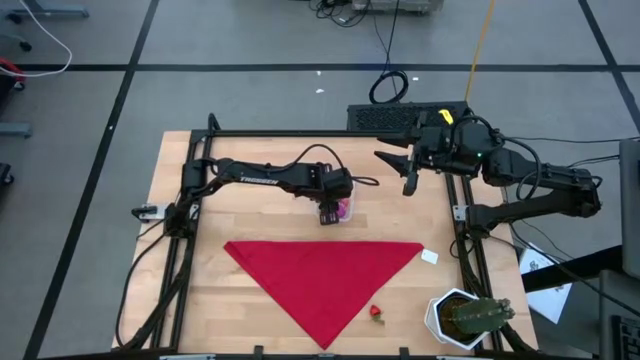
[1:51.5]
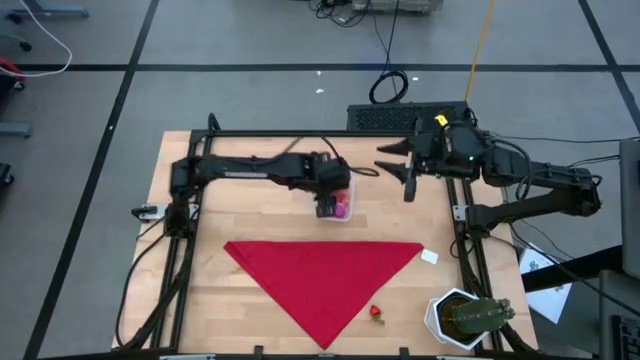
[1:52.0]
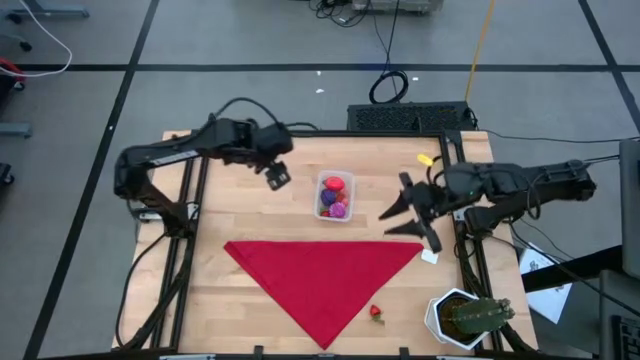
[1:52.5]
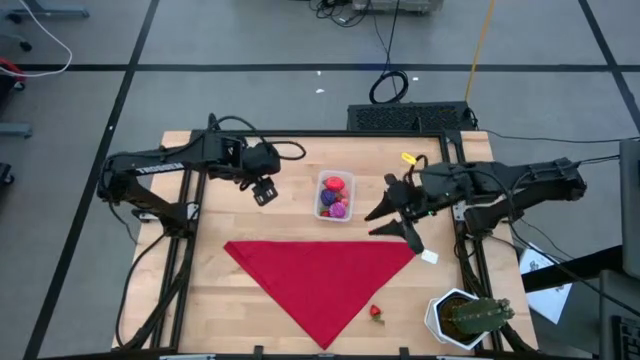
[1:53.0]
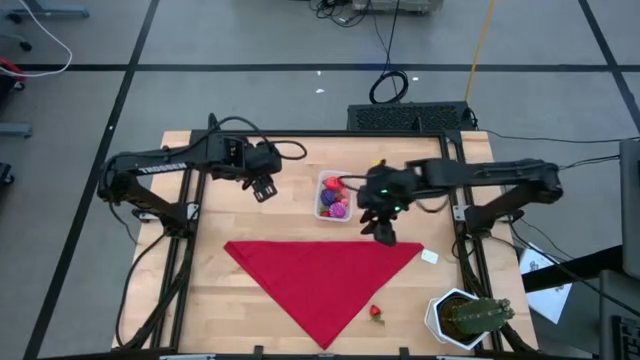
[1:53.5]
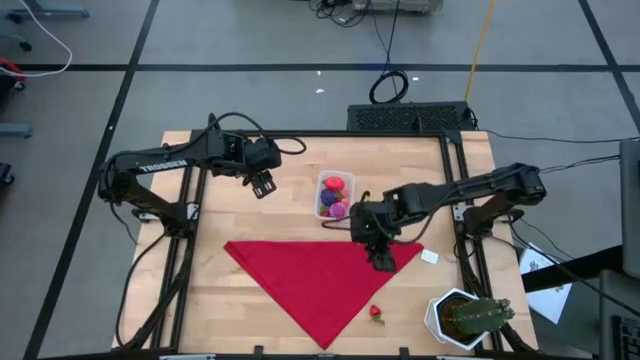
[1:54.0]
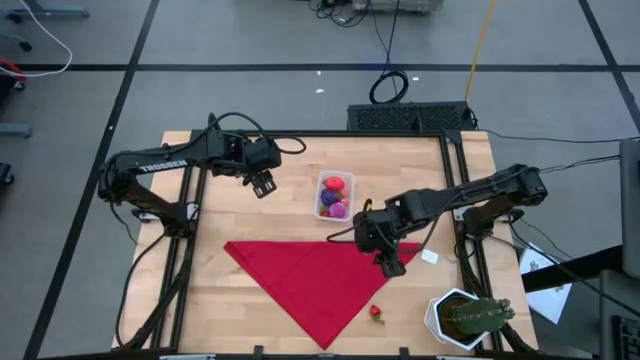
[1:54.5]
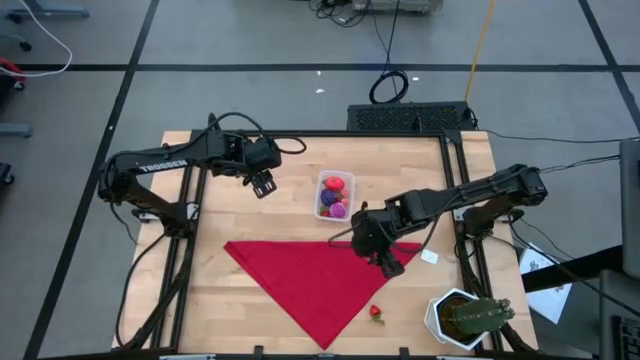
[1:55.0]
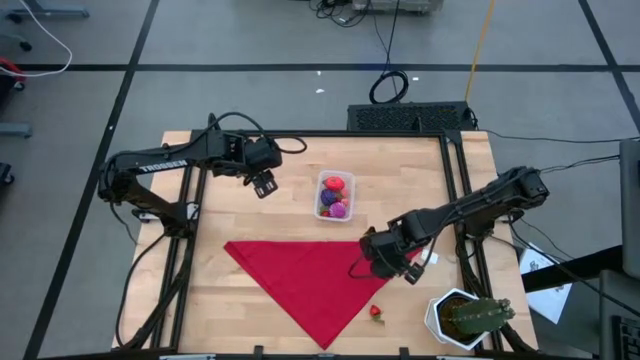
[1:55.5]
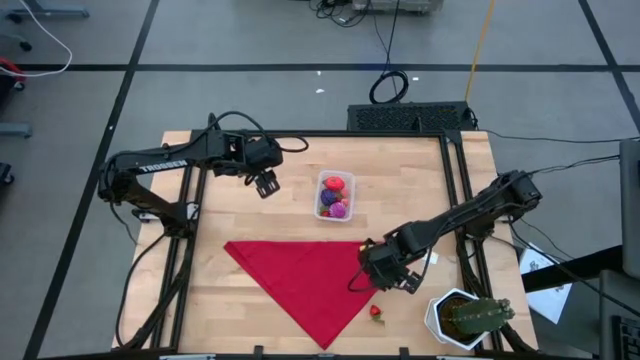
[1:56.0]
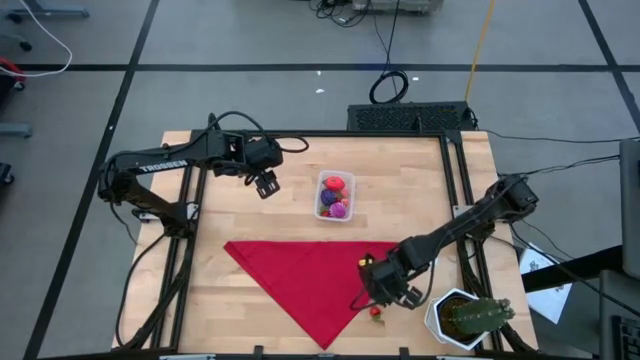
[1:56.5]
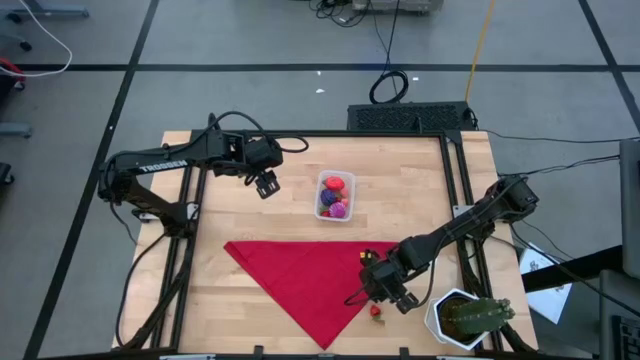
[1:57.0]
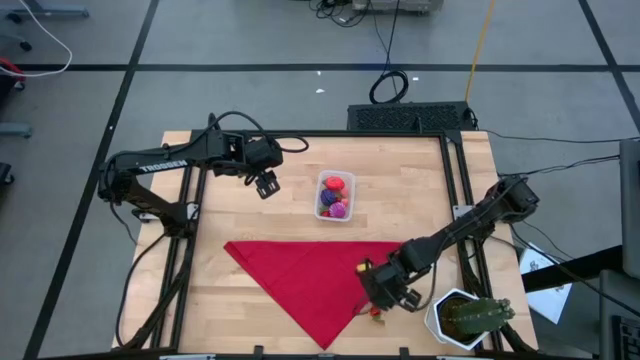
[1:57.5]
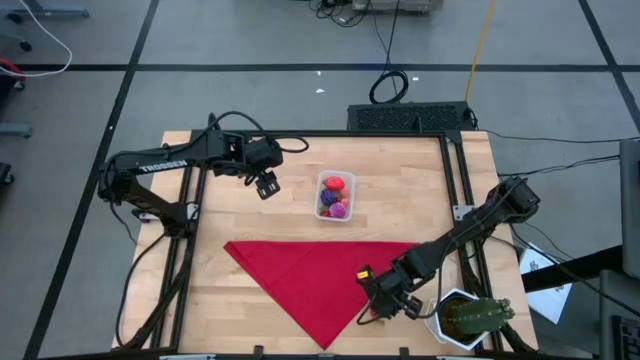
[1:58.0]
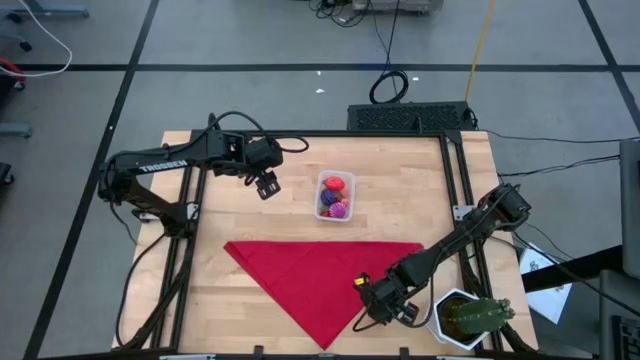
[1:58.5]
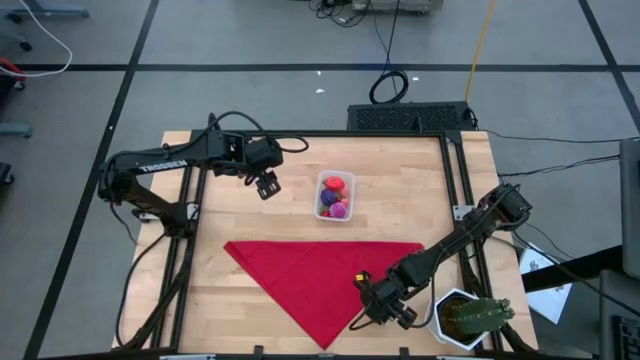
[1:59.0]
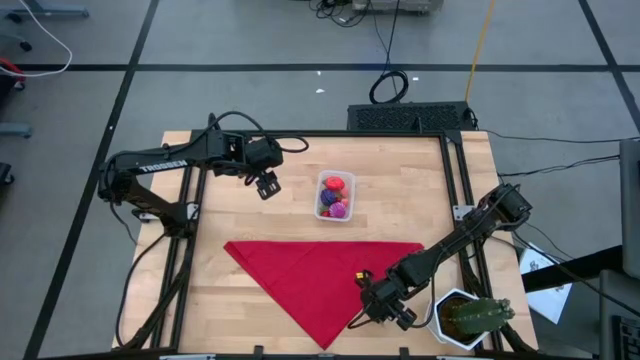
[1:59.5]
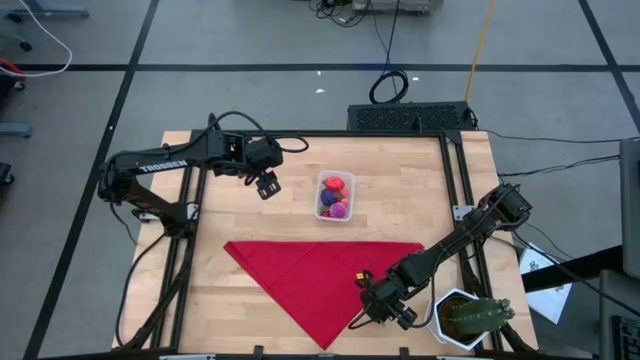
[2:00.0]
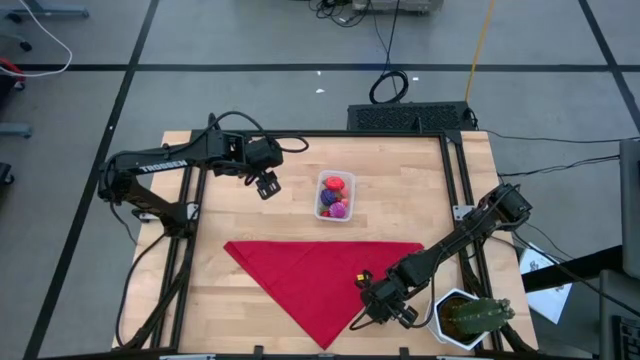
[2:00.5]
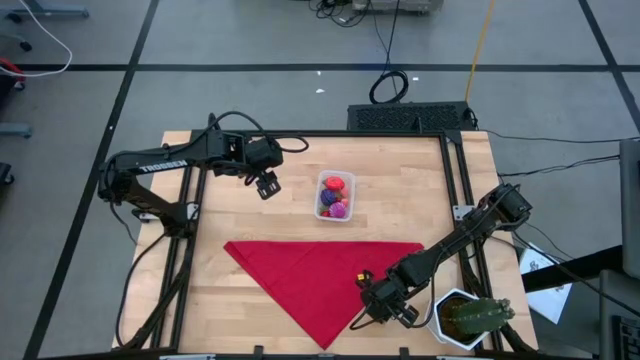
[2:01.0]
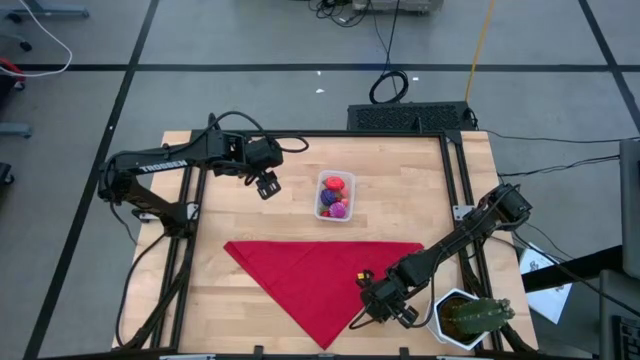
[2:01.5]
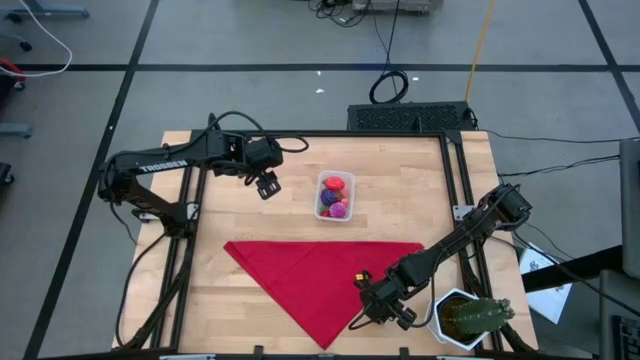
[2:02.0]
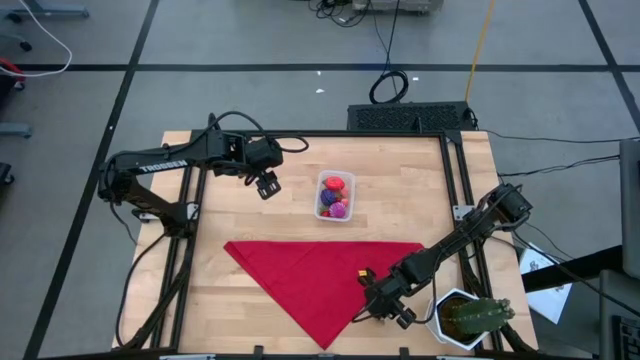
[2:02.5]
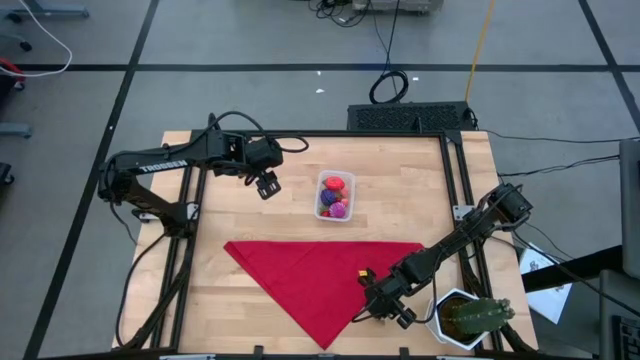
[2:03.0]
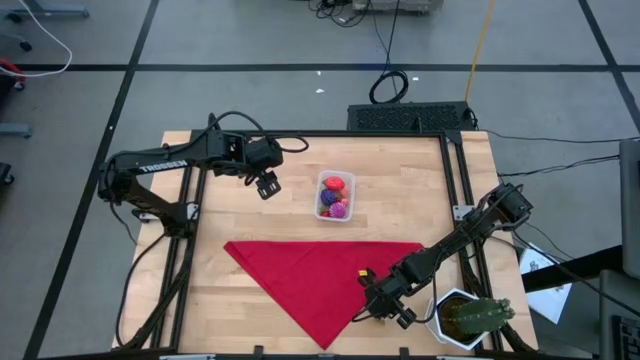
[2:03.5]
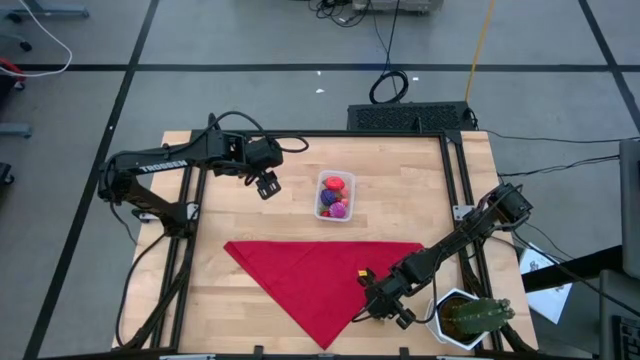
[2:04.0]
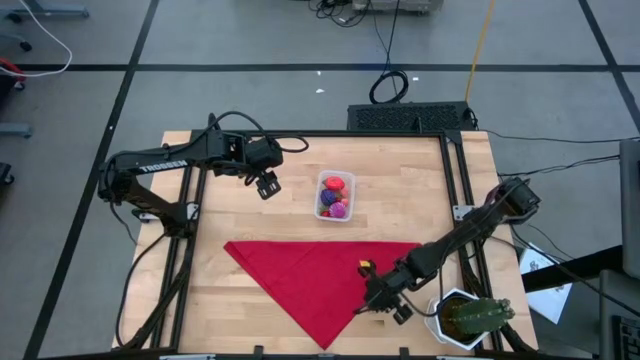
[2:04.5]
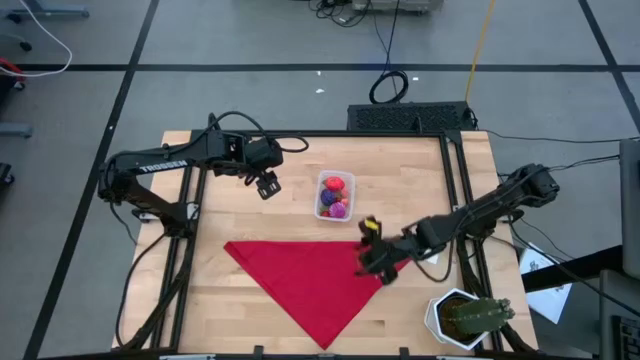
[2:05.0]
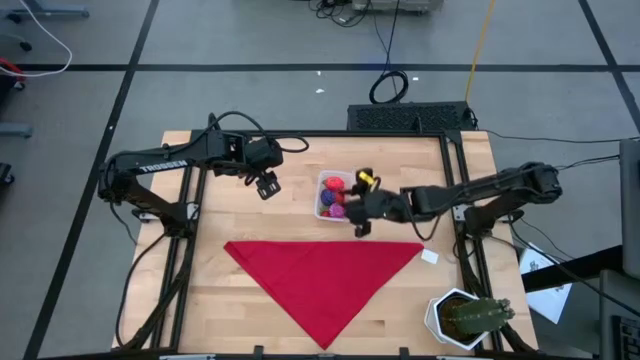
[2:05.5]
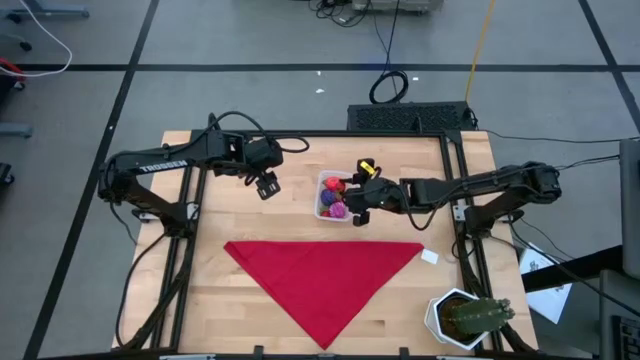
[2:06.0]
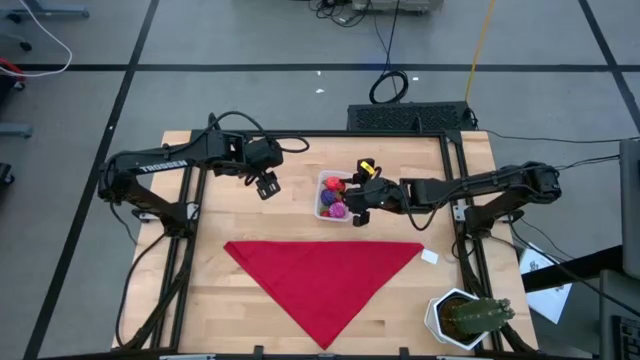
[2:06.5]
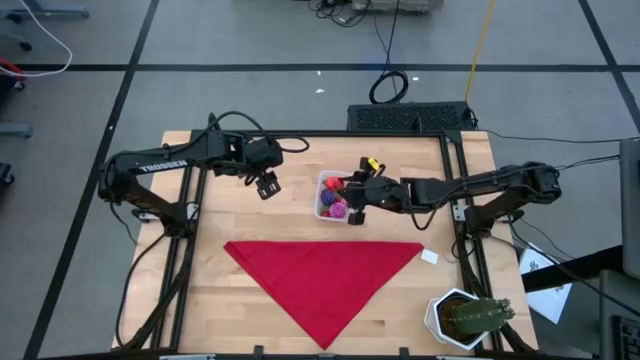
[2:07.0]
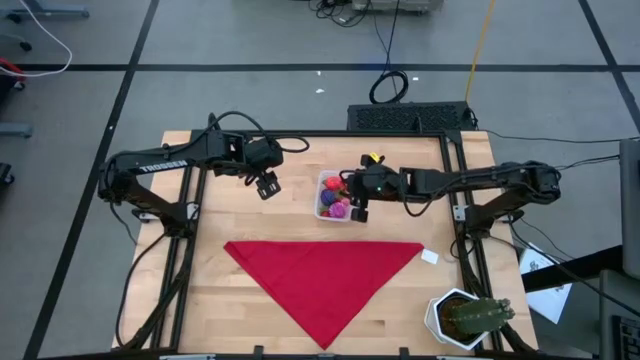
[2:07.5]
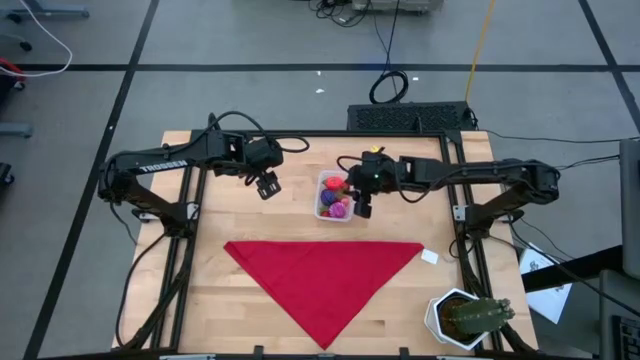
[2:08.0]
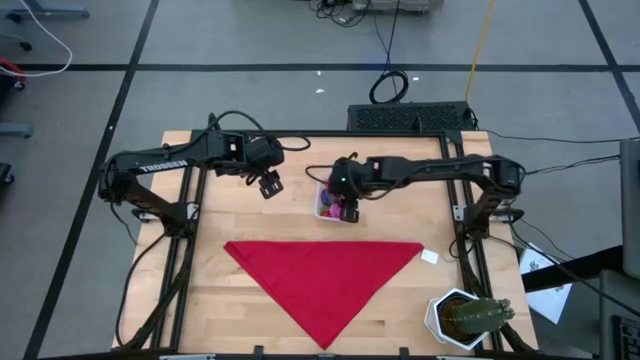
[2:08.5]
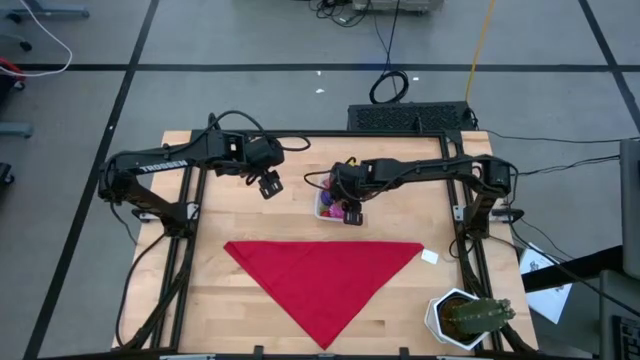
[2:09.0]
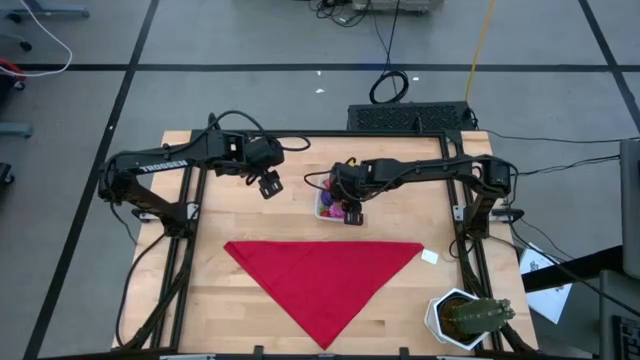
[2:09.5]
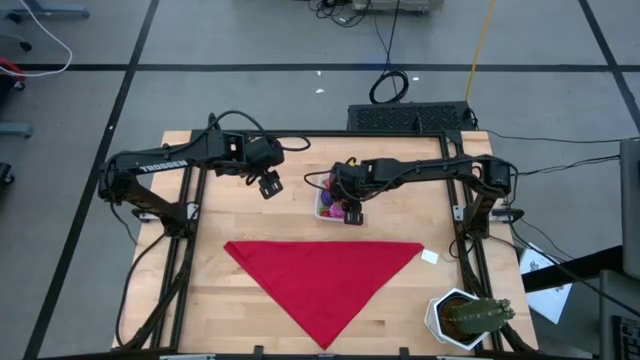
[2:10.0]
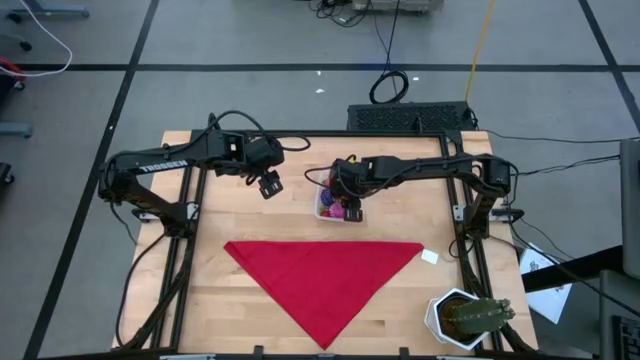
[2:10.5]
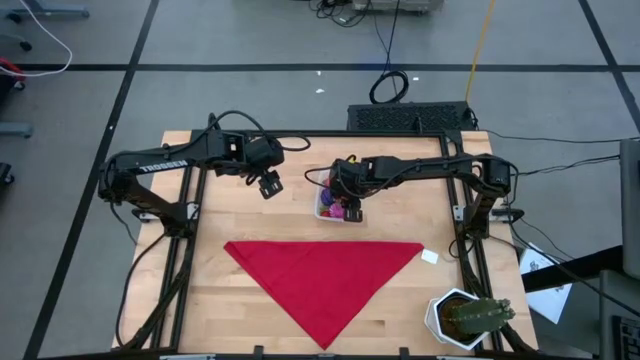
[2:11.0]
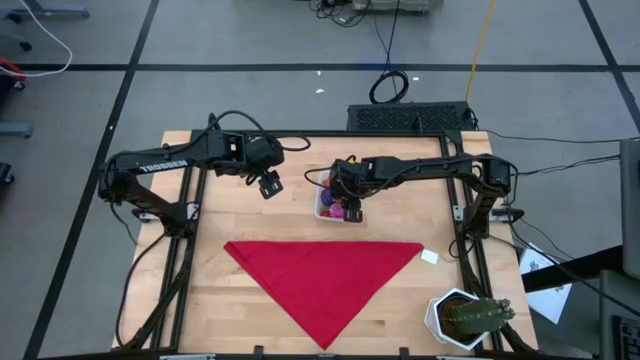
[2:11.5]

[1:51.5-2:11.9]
Task: Pick and placing Produce into tupperware
Put the red strawberry into the transparent bin
